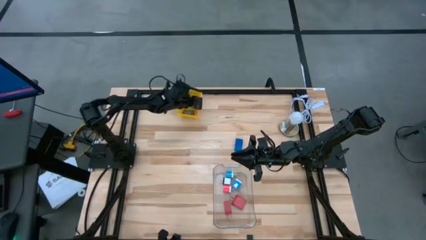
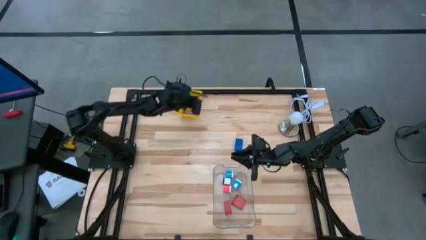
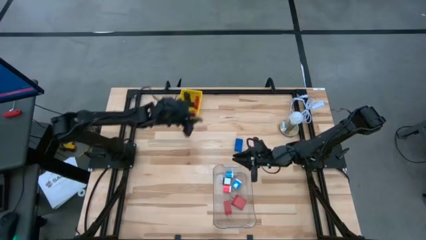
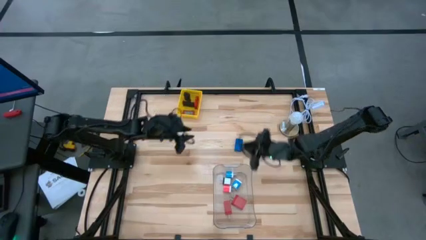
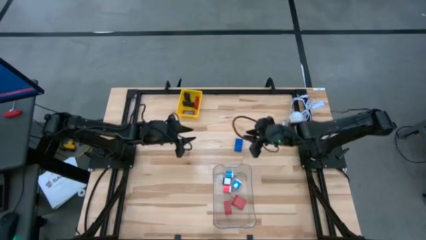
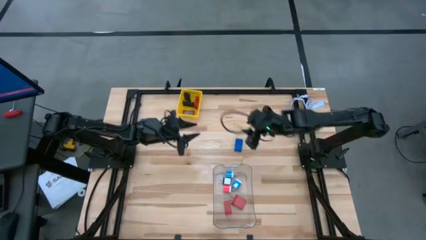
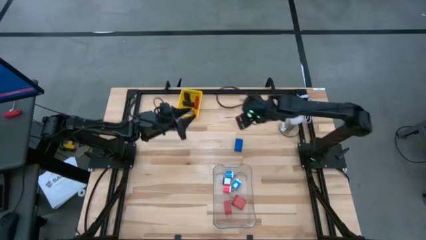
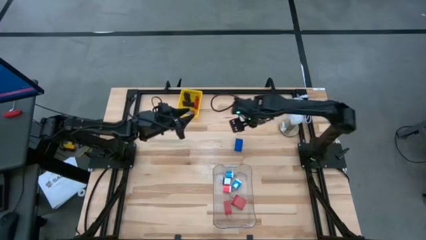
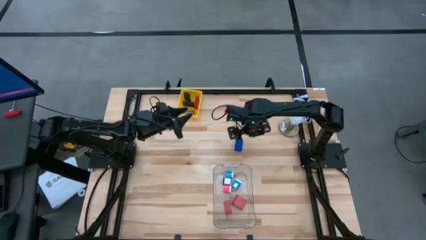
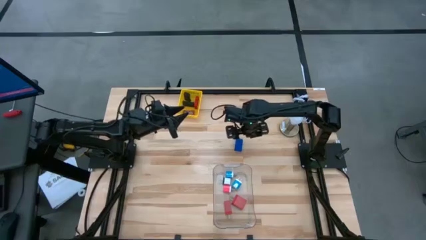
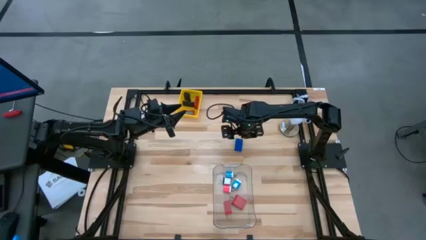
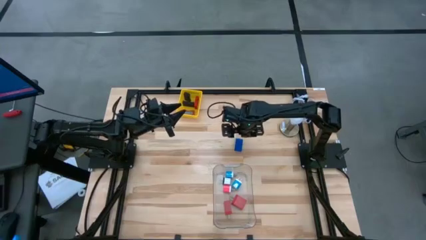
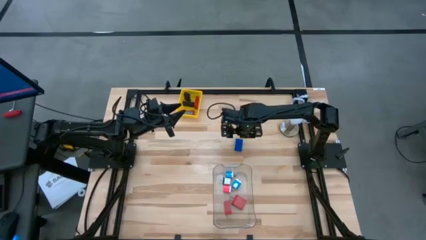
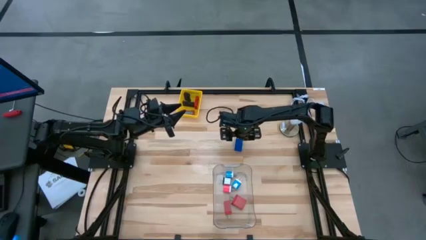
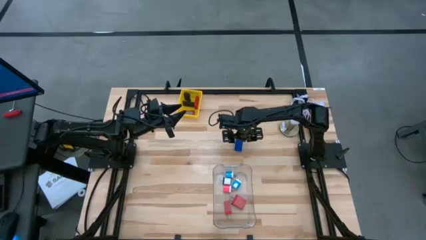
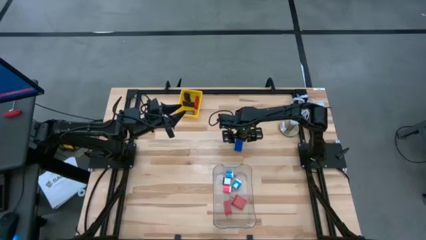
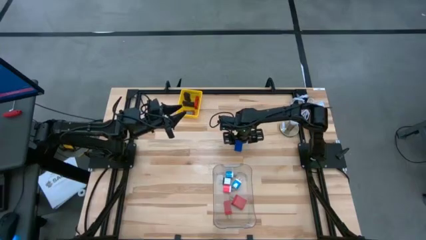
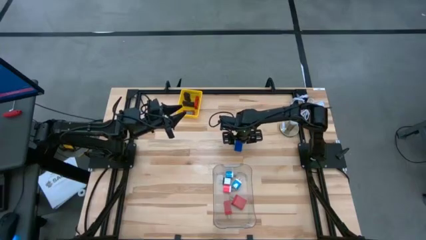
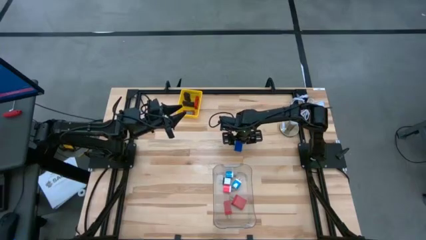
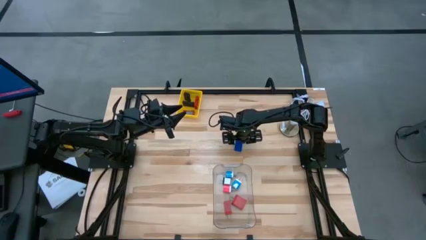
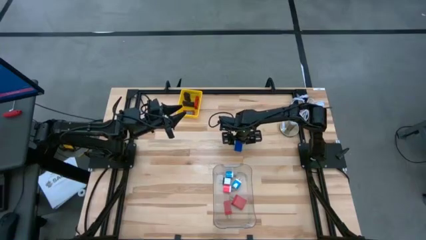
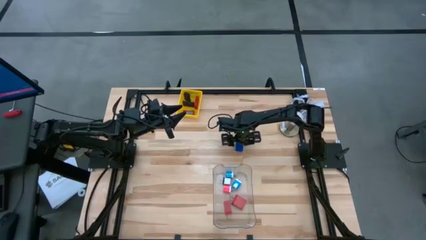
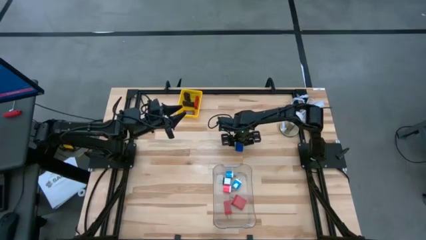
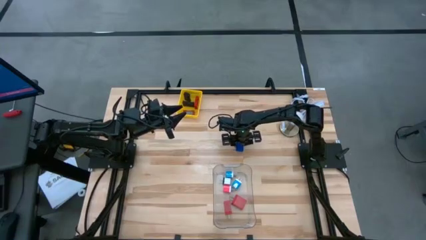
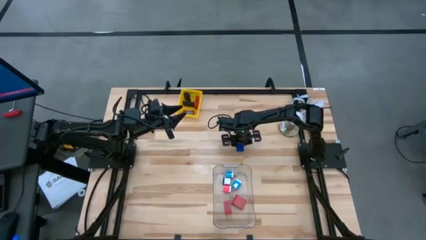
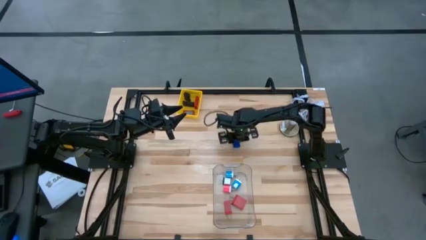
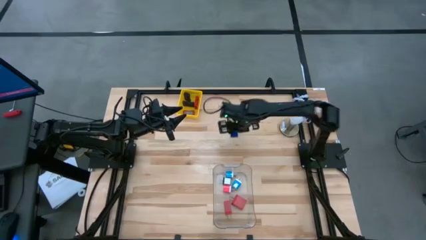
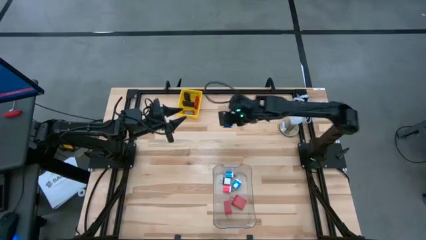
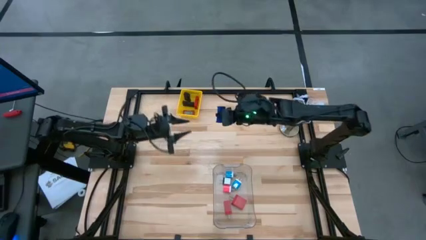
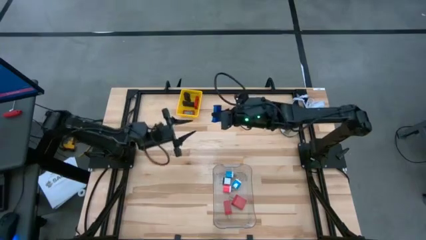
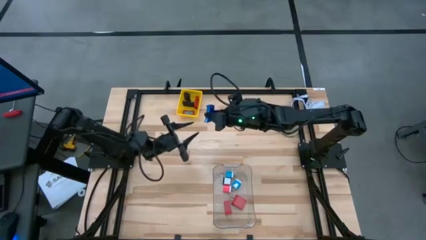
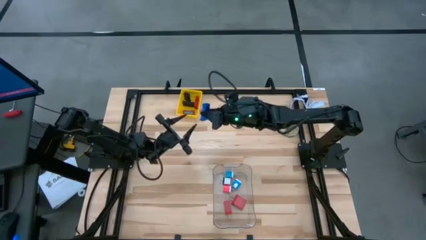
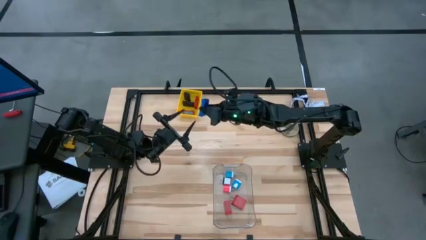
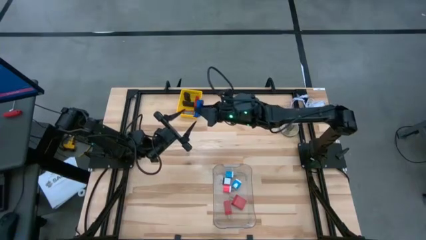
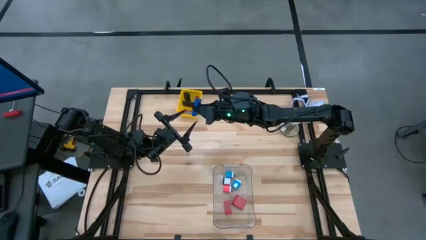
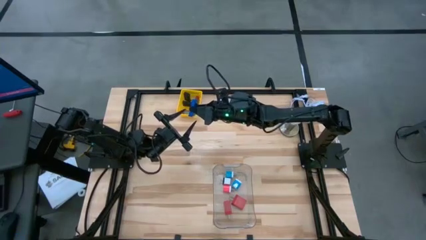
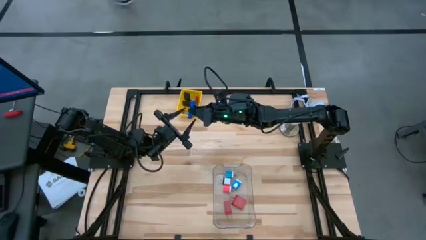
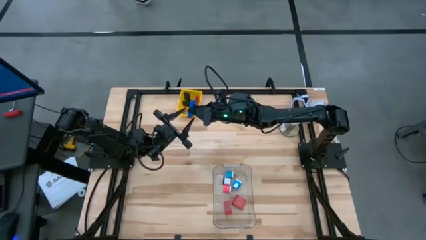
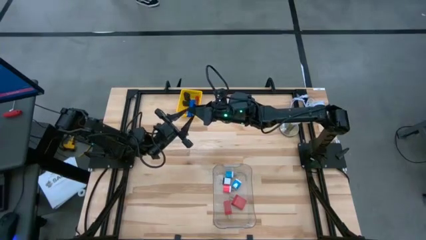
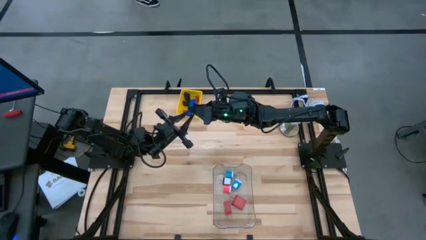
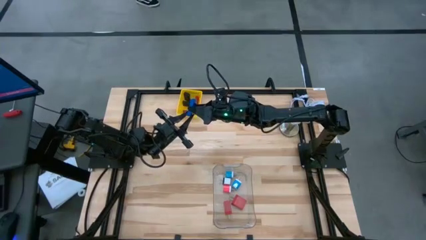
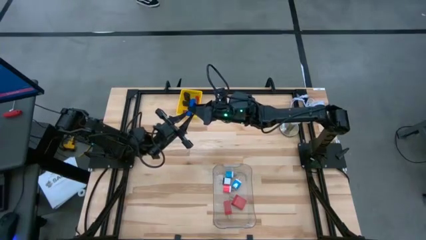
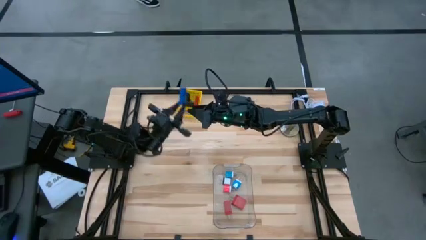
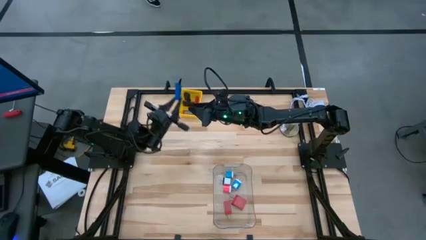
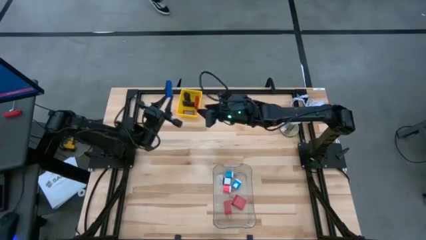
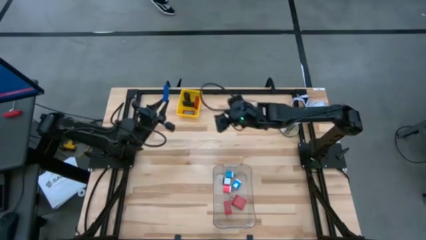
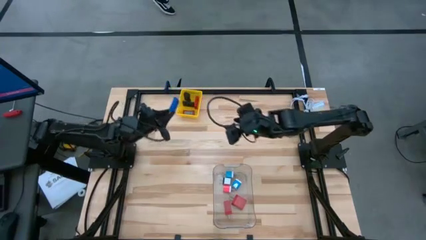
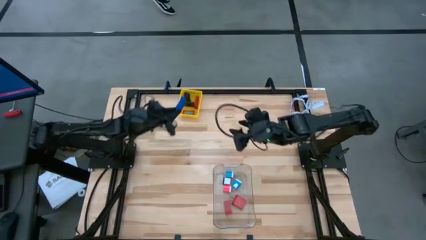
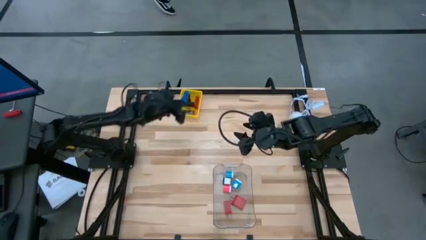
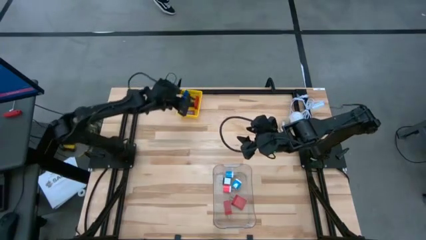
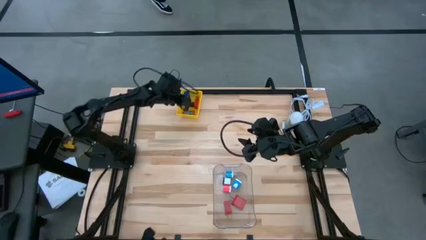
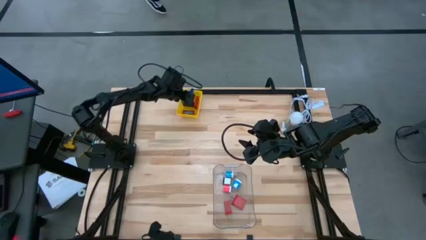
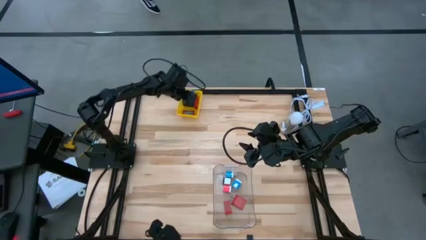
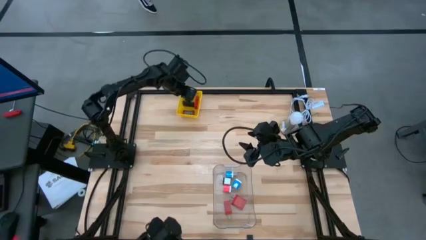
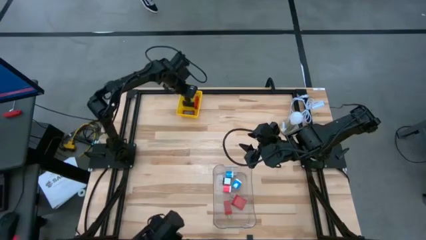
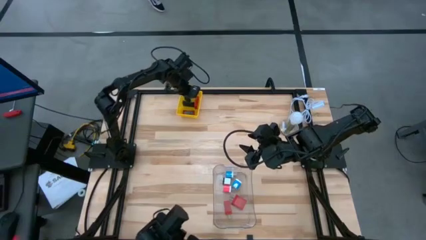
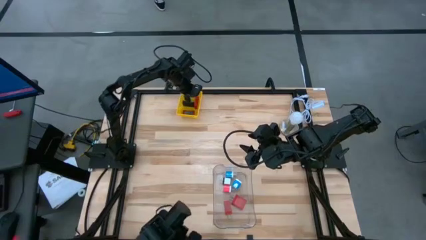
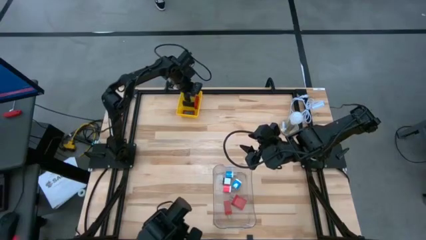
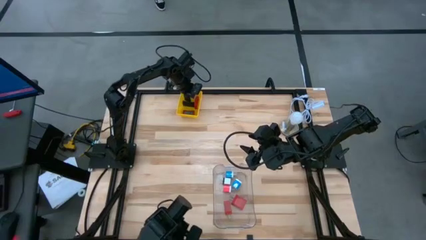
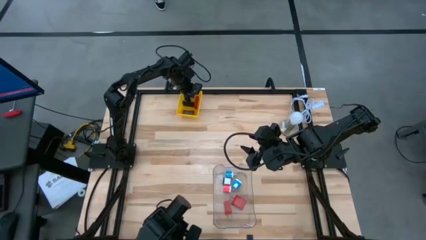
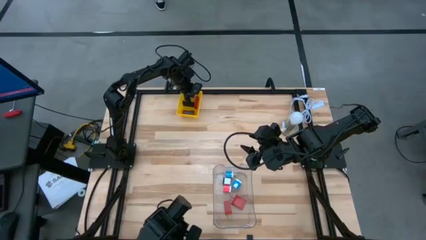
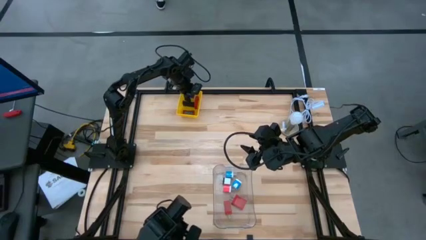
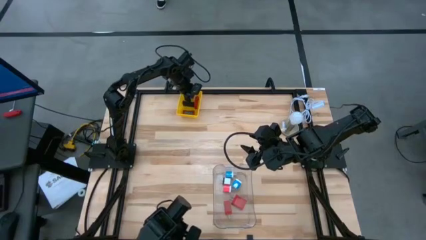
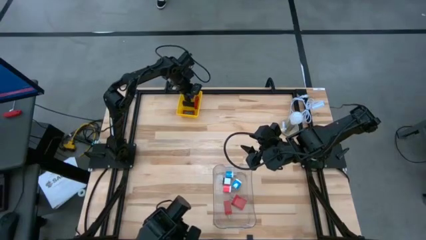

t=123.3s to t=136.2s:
Task: Pick & Place Office items
Put the blue digital clock into the yellow bin
